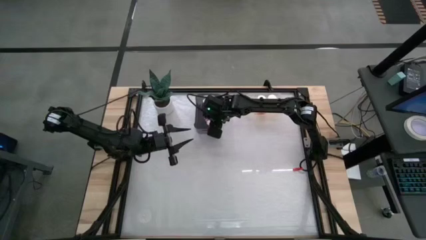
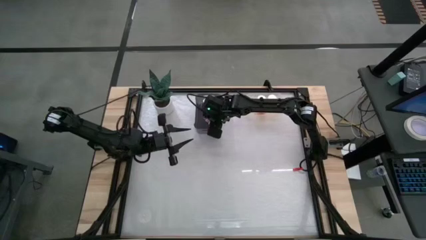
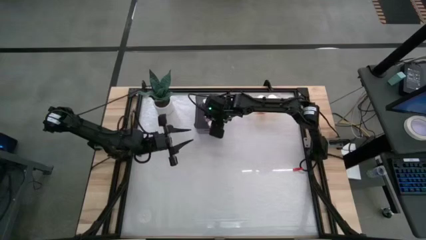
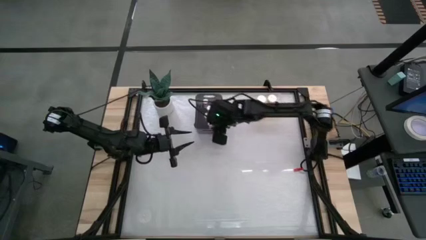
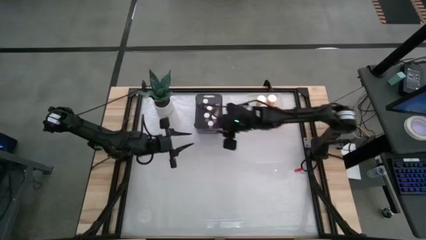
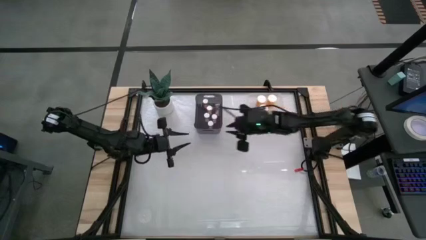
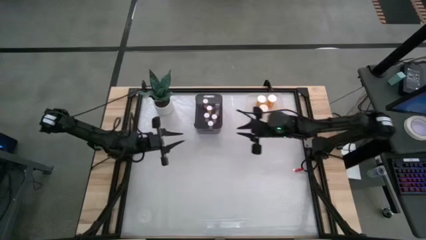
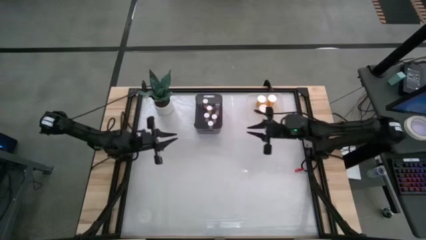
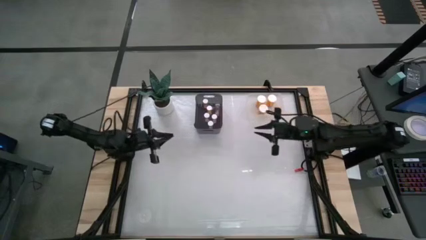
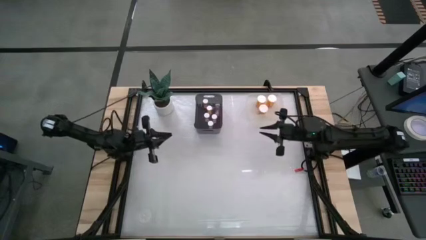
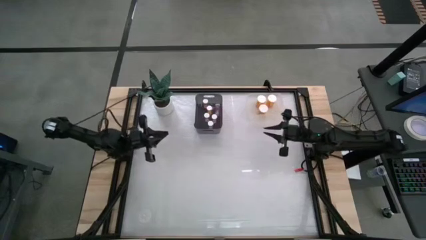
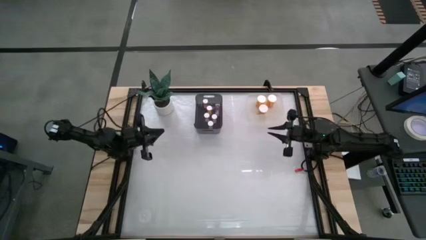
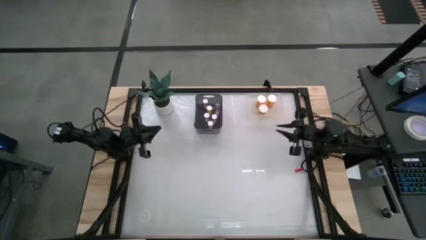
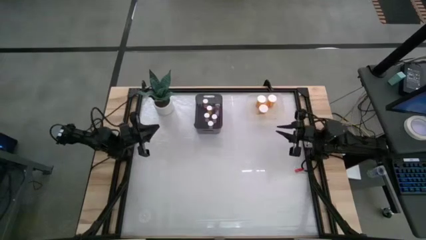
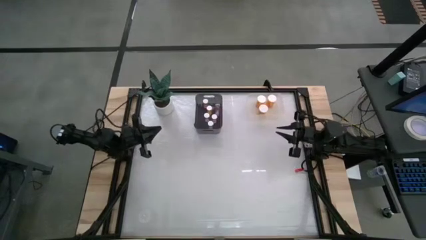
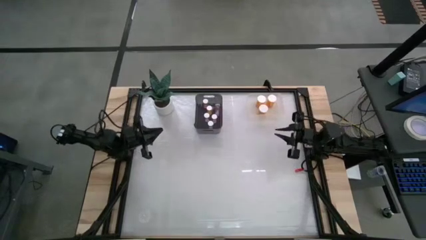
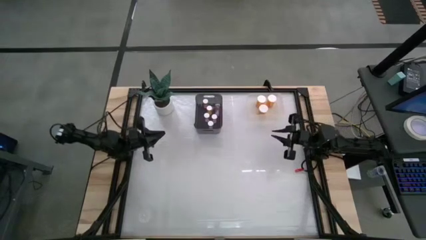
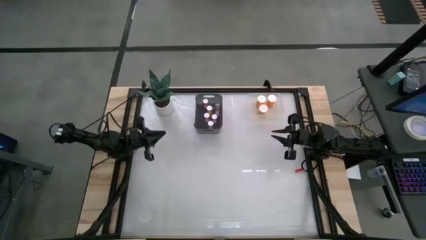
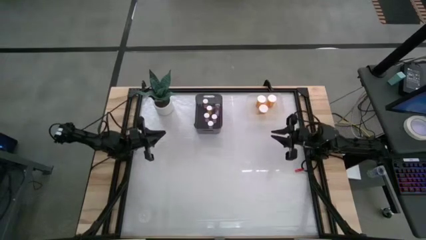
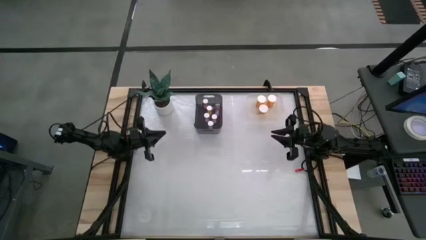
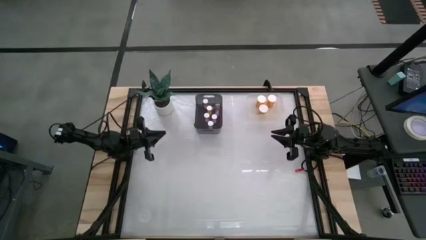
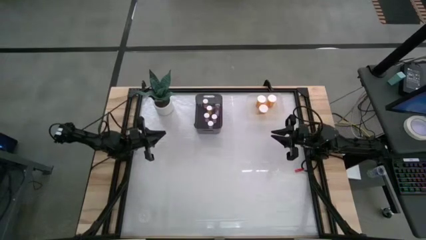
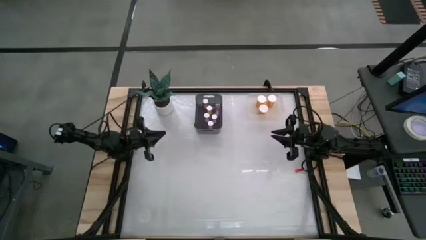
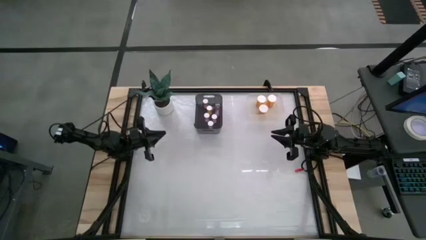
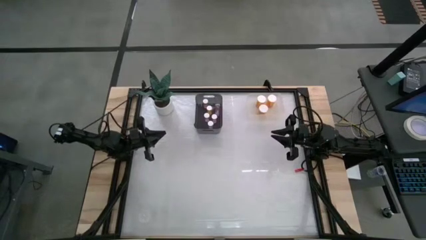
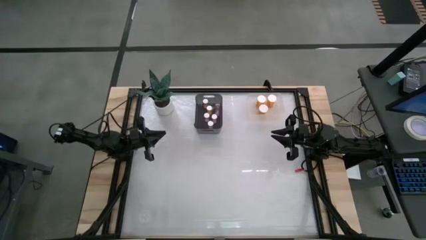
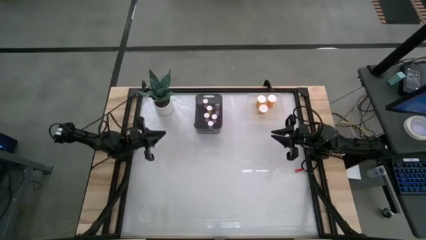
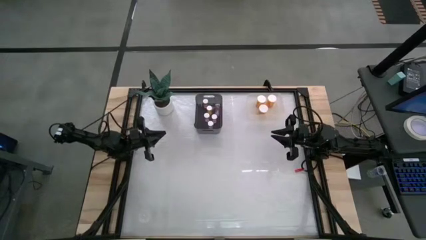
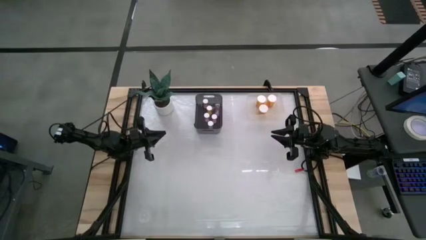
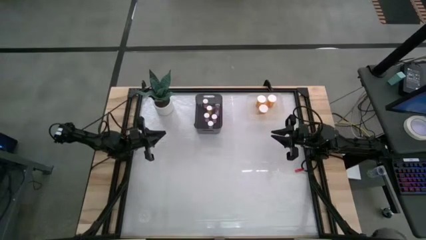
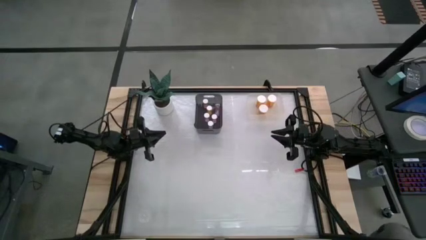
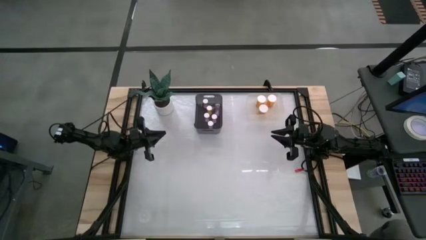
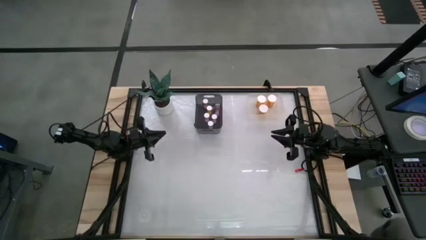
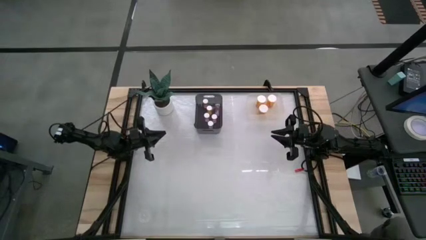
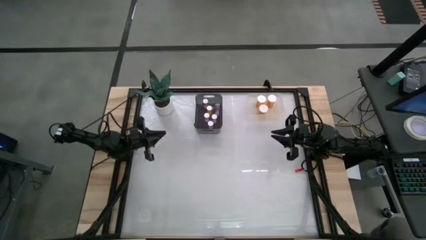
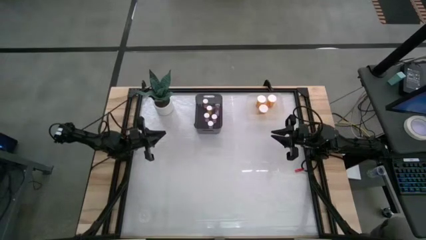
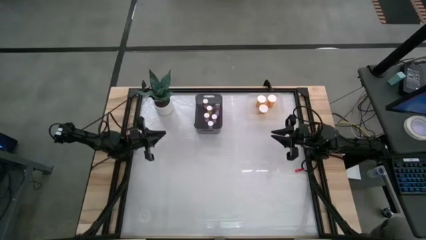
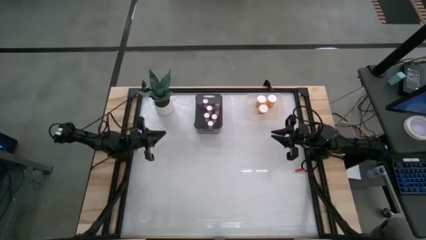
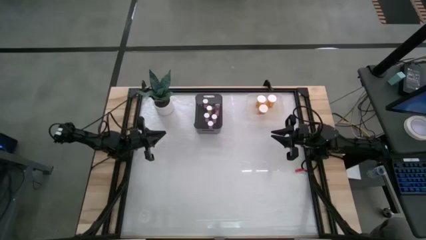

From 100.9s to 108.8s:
Task: Pick and place medicine bottles into bin by pill shape (circle, oval)
Return to Home Position

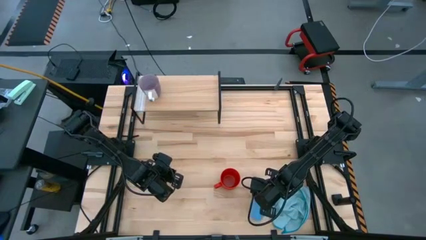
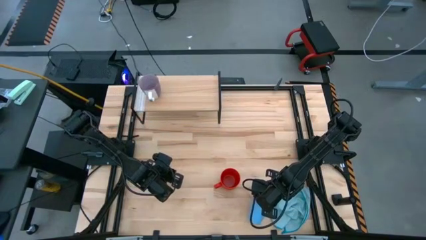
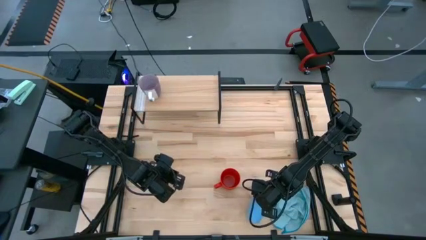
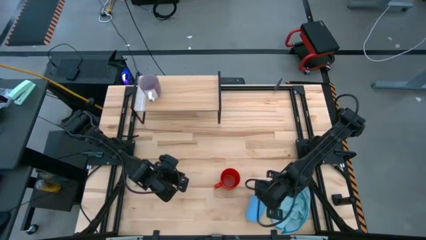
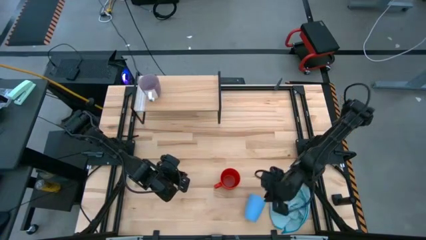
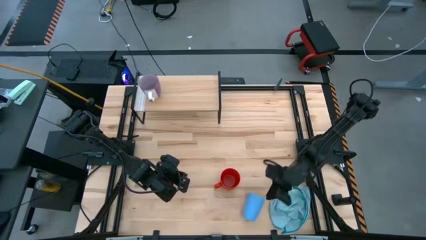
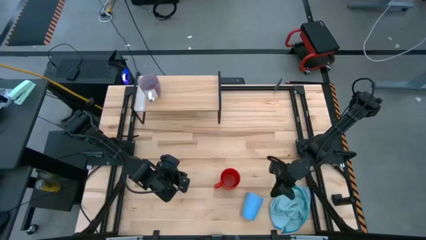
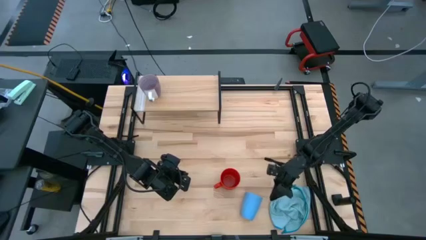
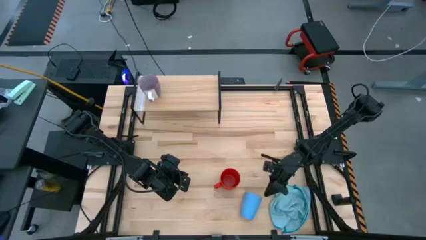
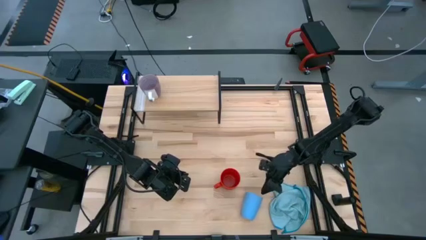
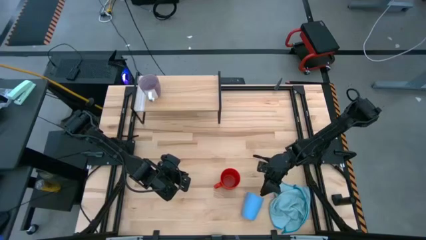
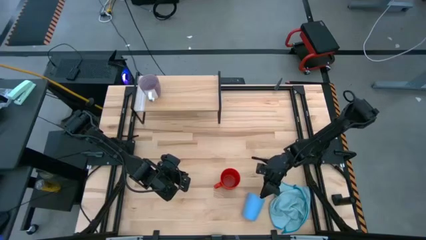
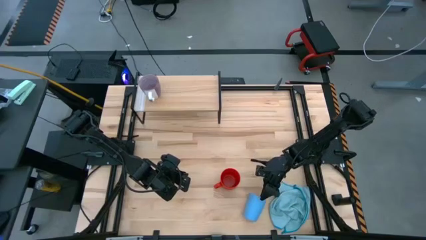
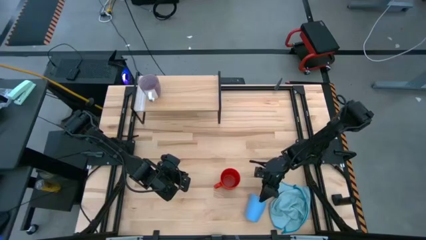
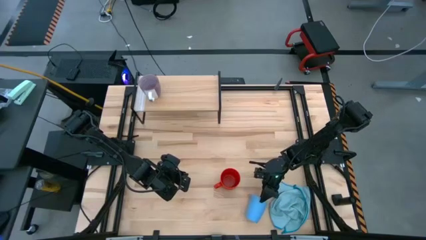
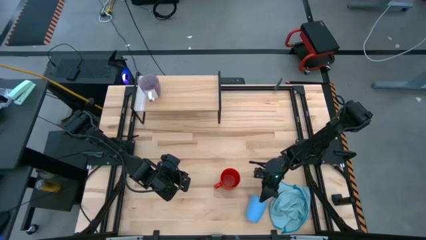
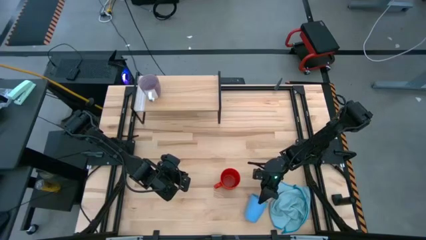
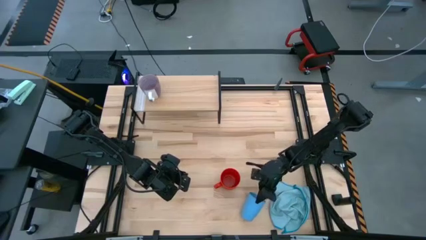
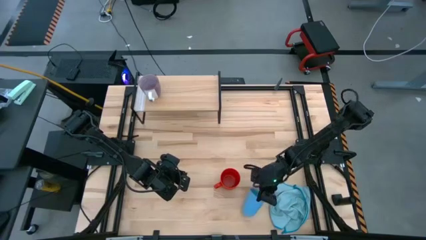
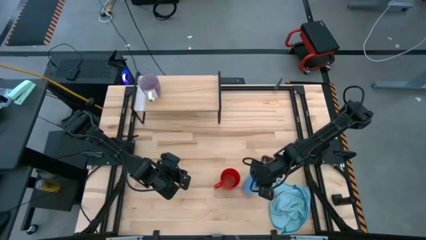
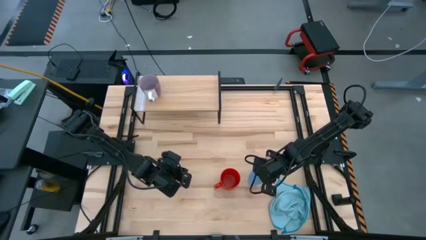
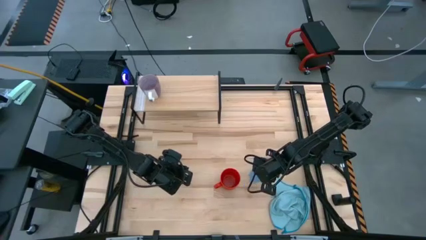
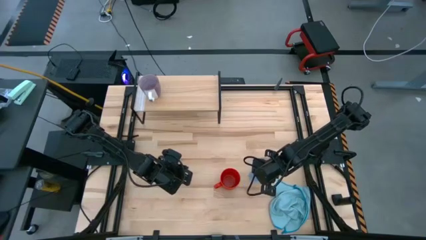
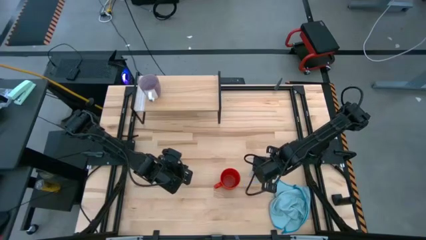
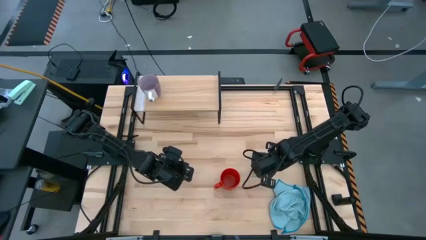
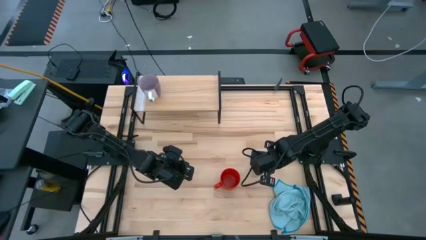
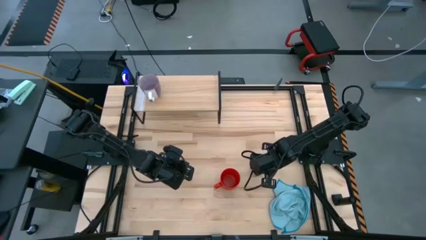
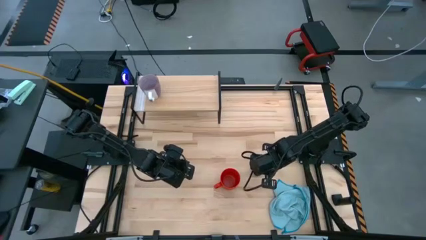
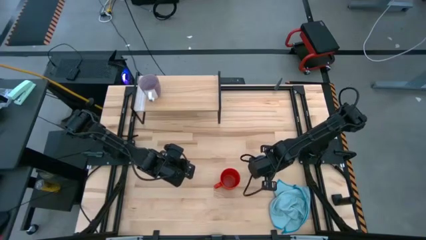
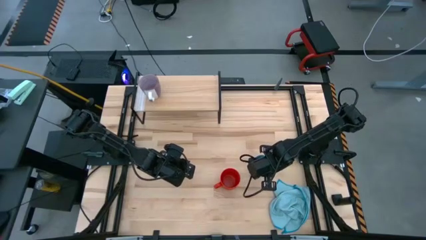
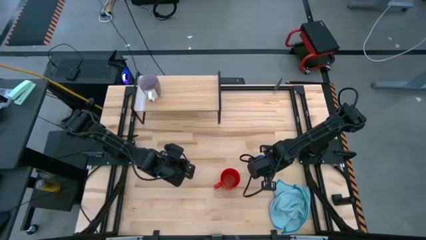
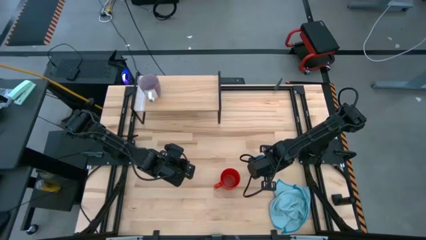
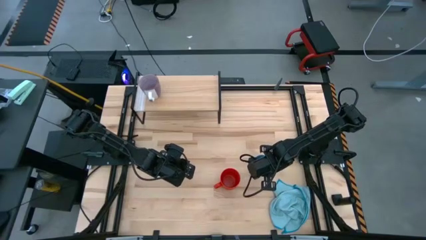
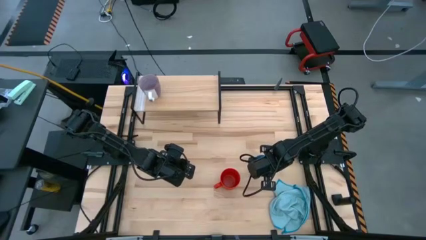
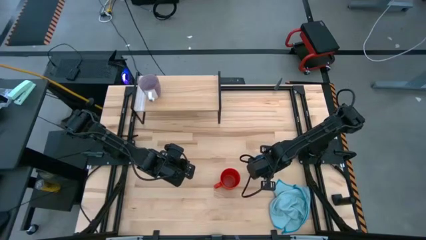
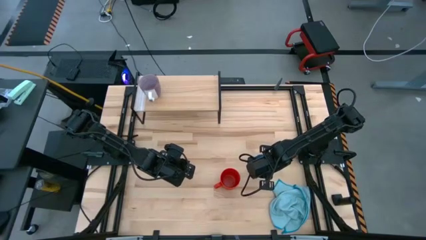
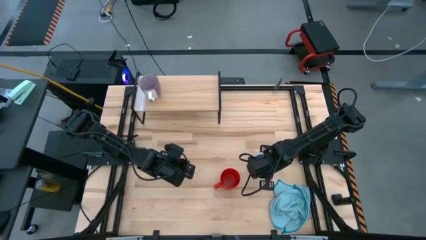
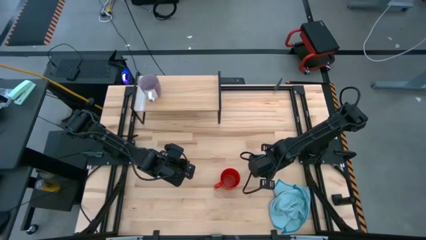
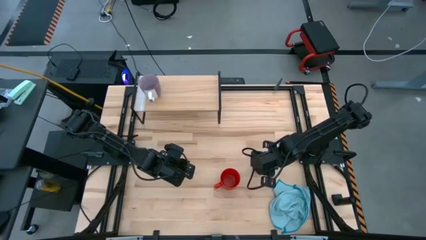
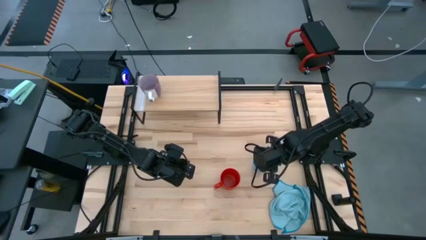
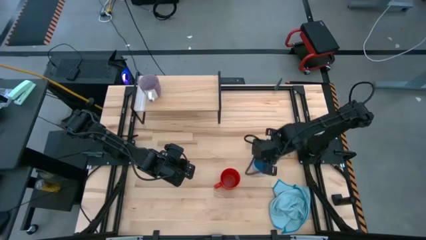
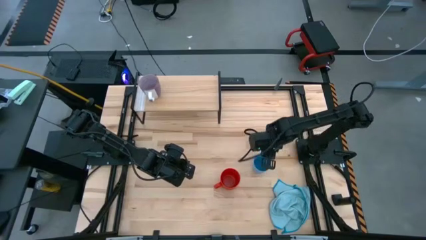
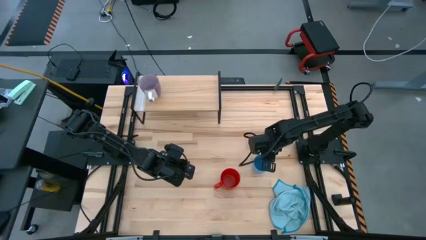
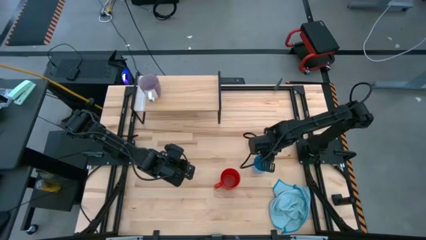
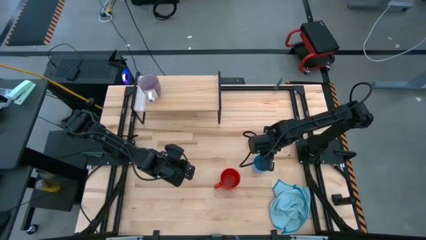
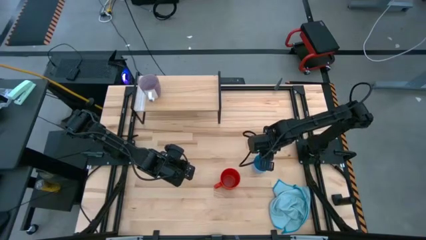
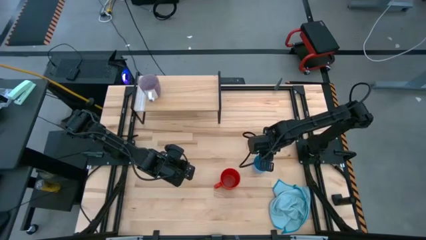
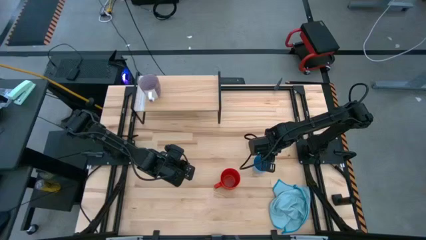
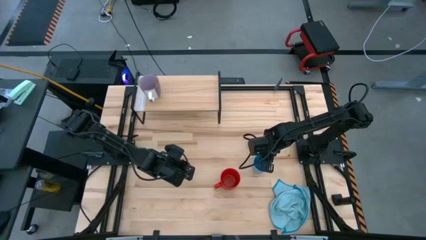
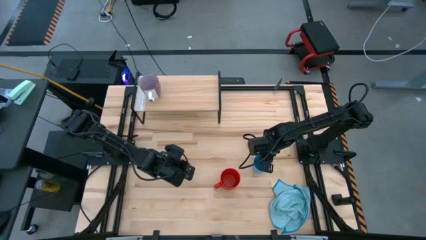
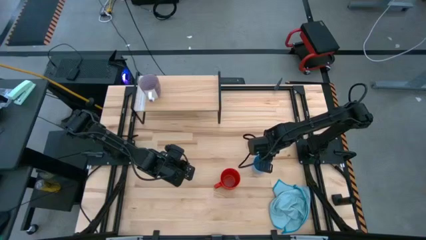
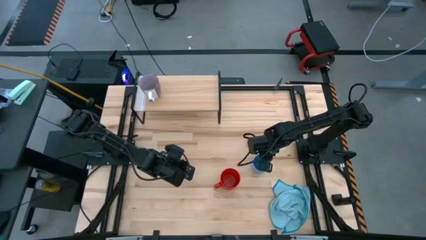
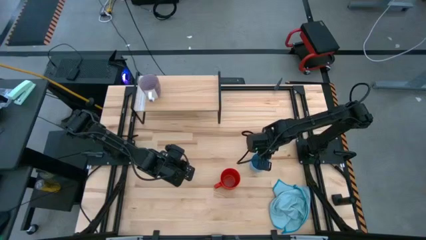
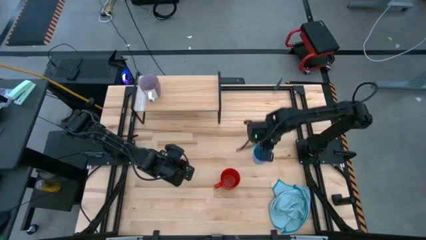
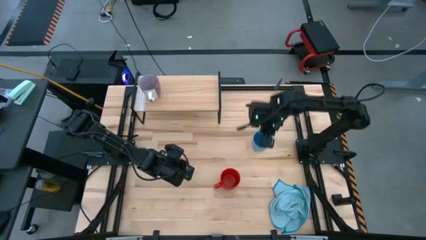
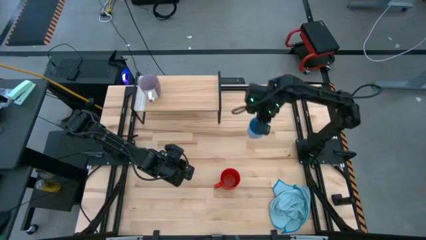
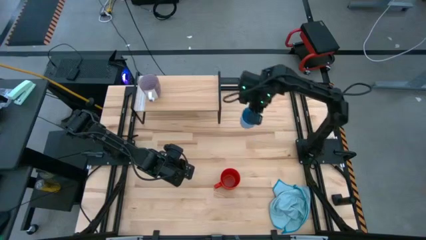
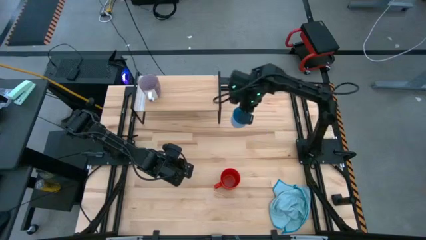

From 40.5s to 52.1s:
Task: Stack small to large cups/mugs on shelf
Put the blue cup on the shelf
